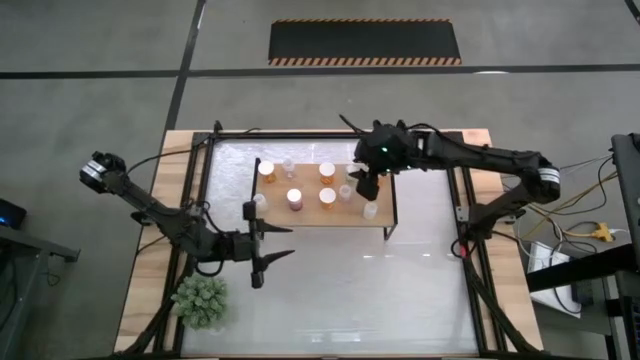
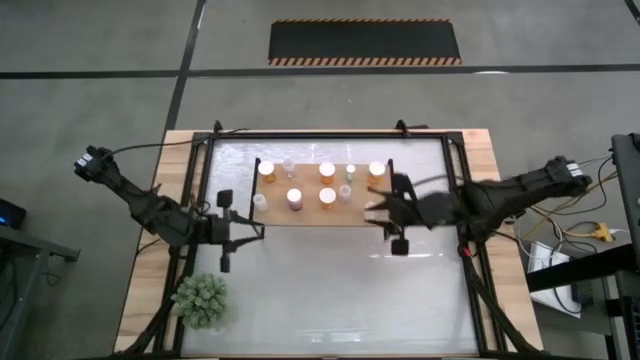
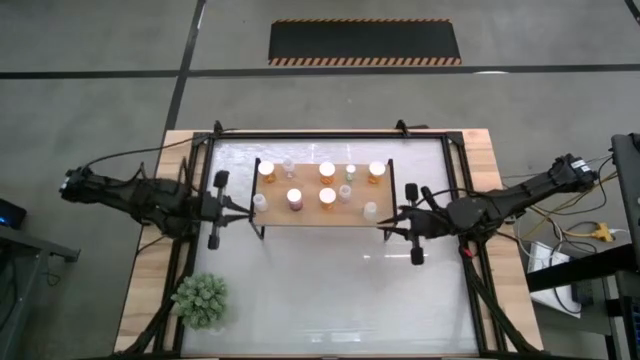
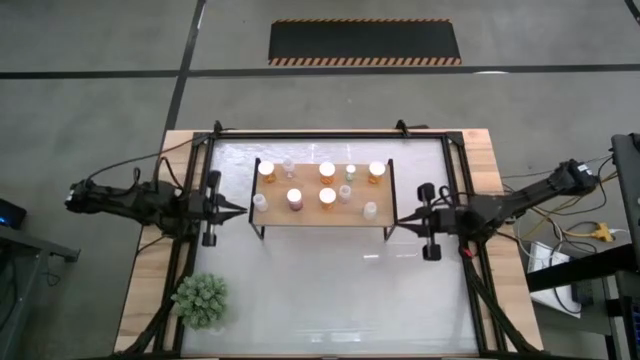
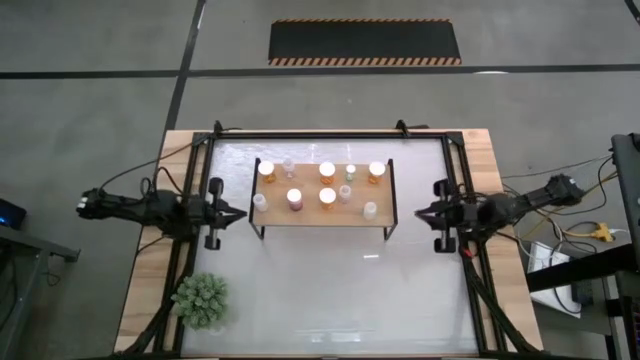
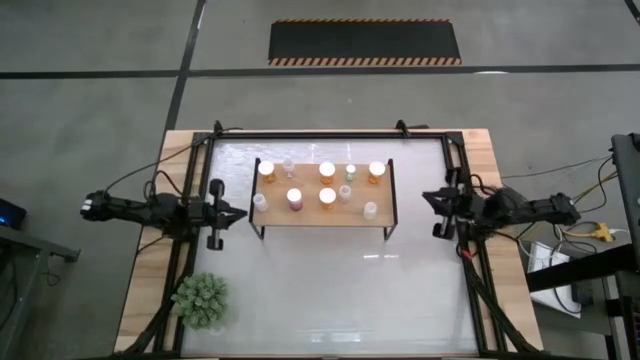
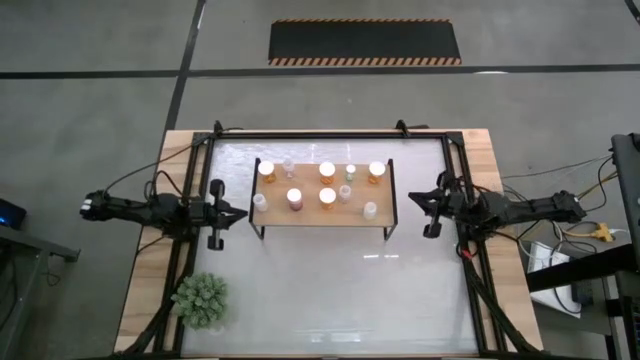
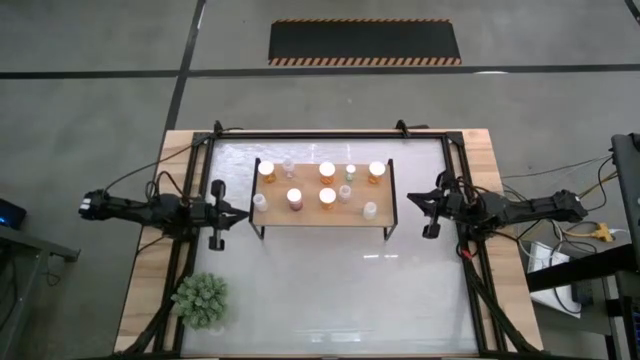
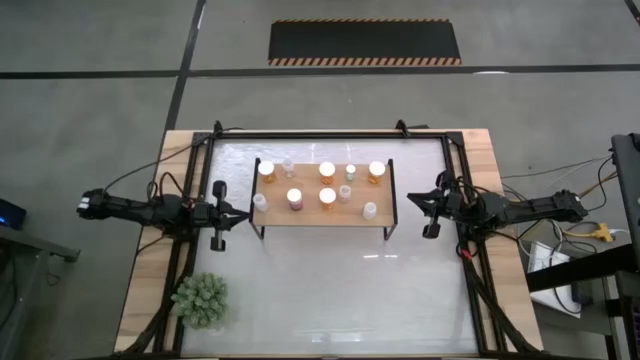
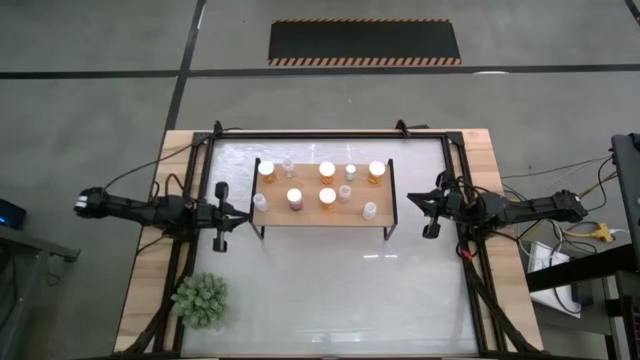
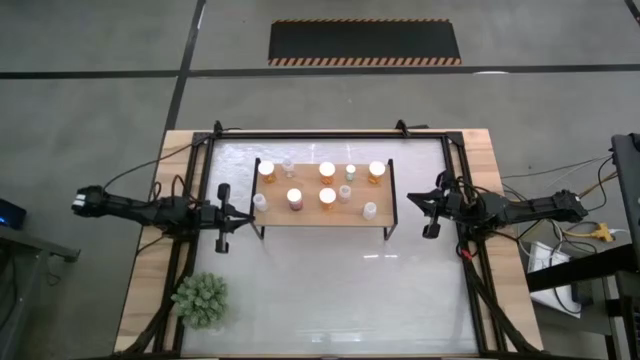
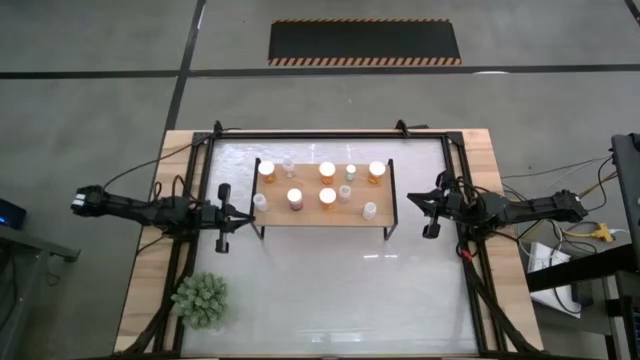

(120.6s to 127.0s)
Task: Pick and place medicine bottles onto shelf by color
Return to Home Position

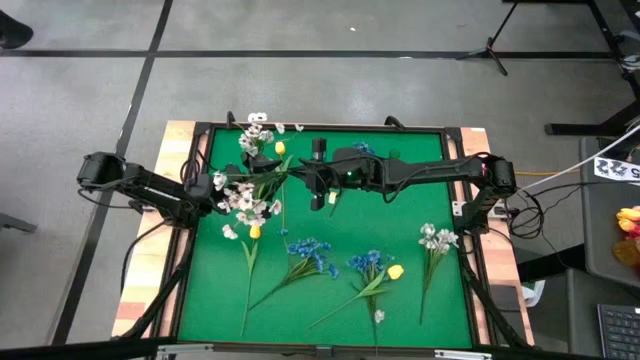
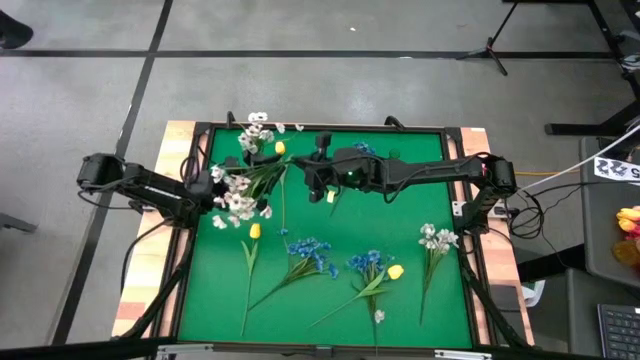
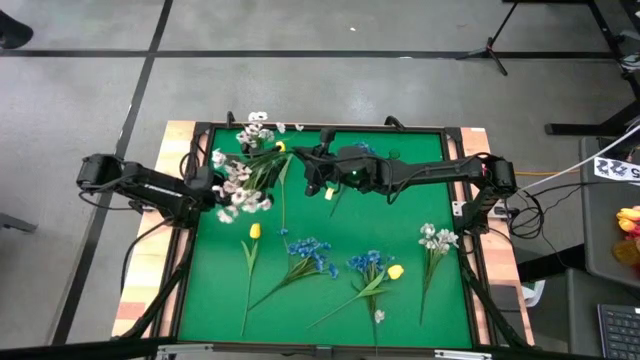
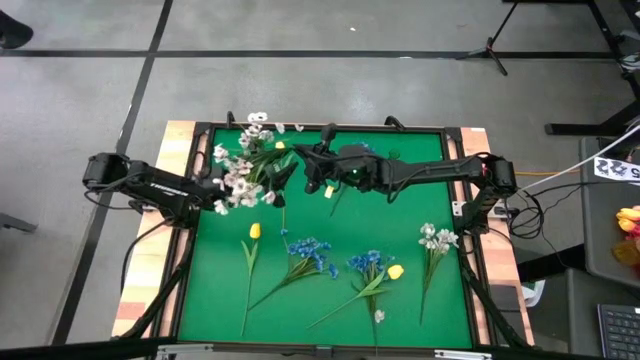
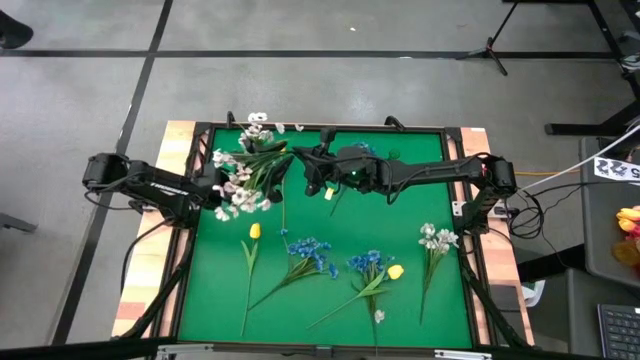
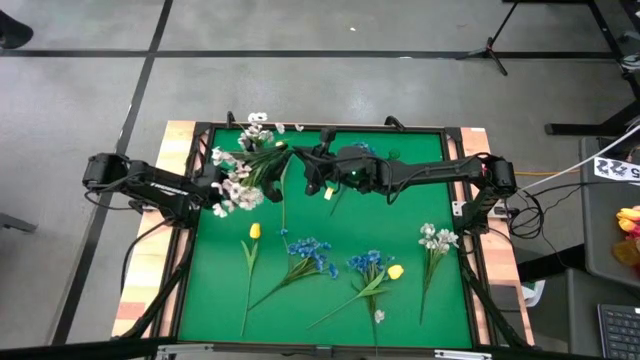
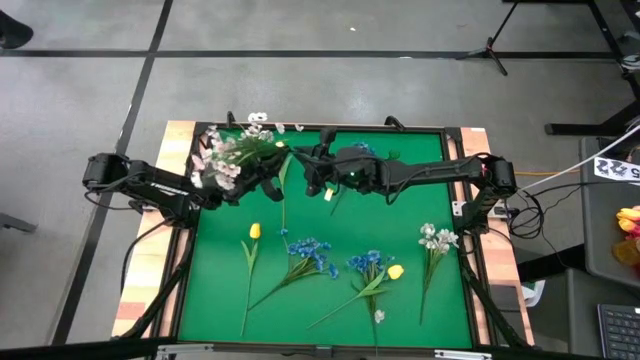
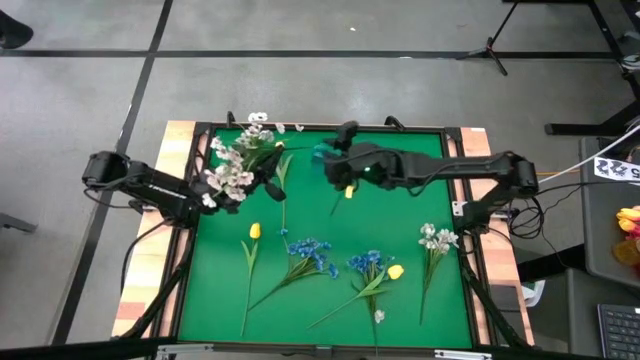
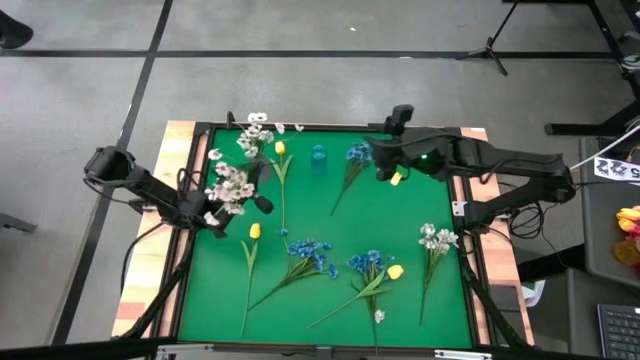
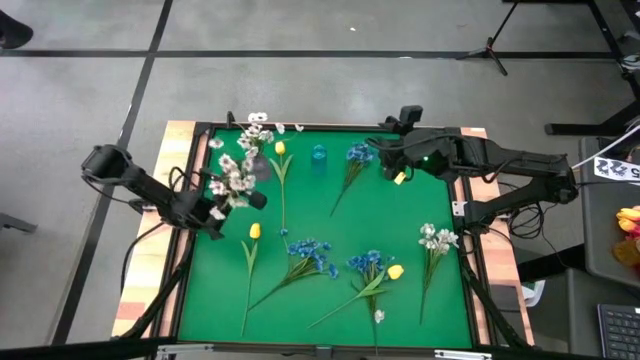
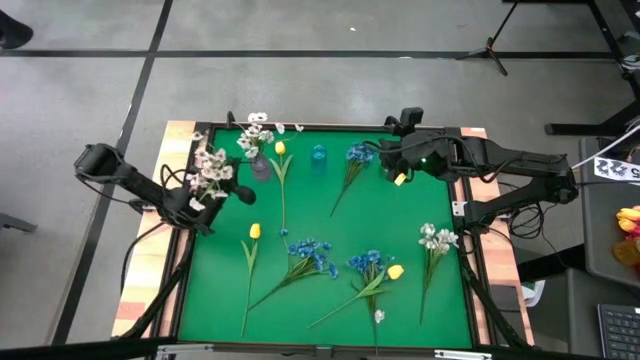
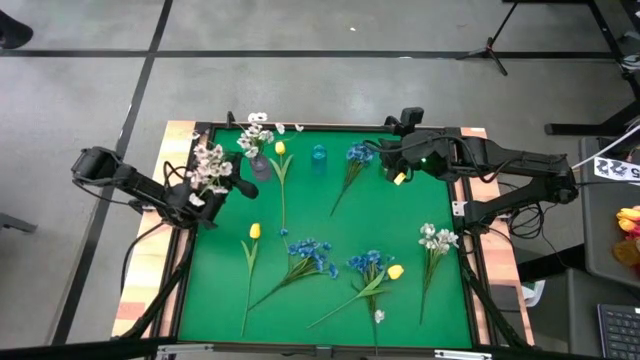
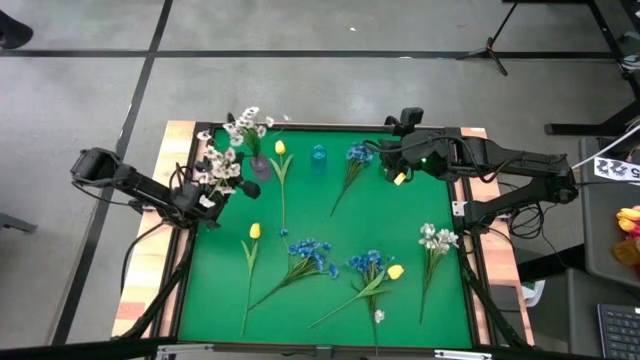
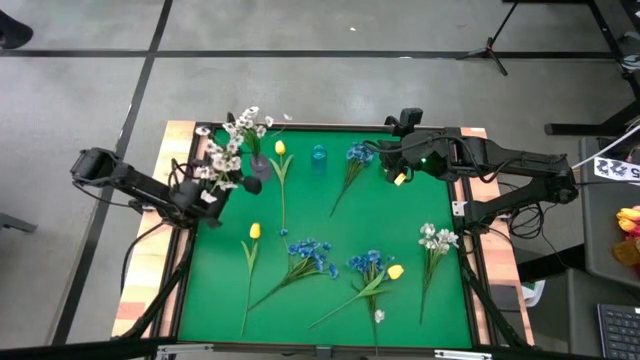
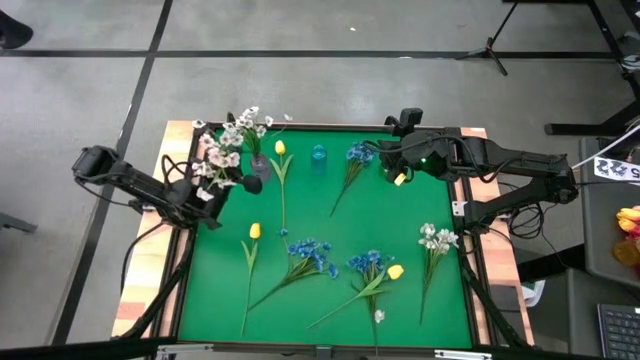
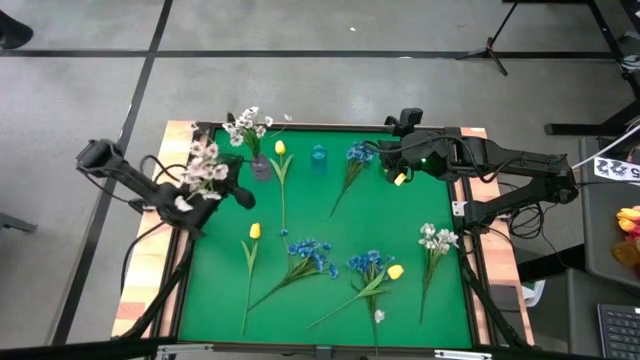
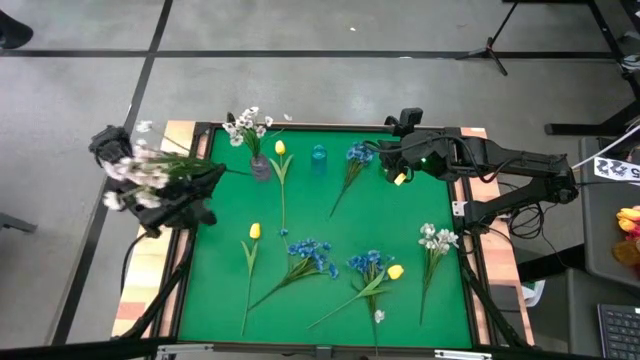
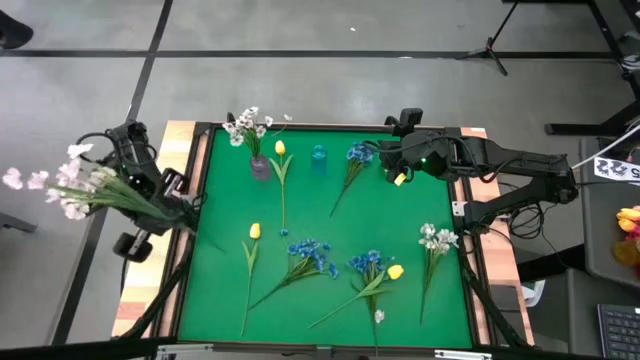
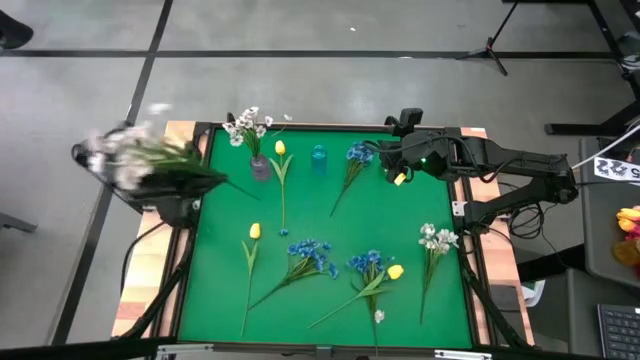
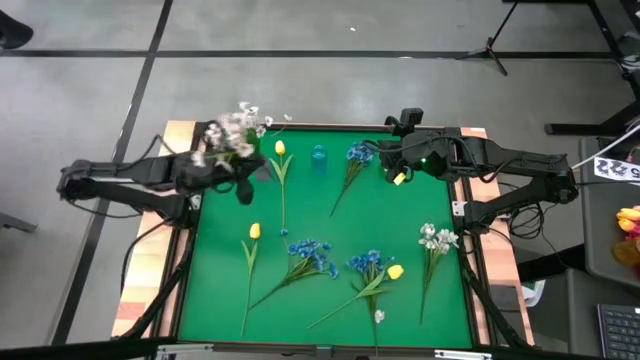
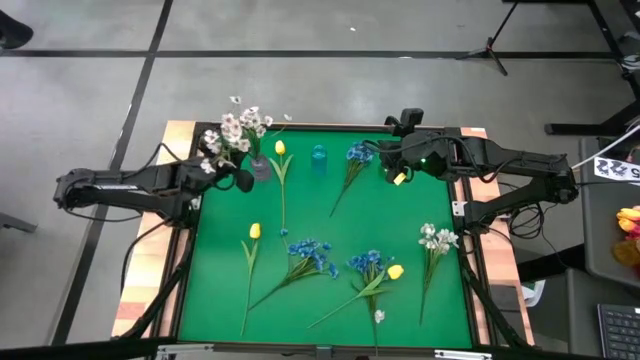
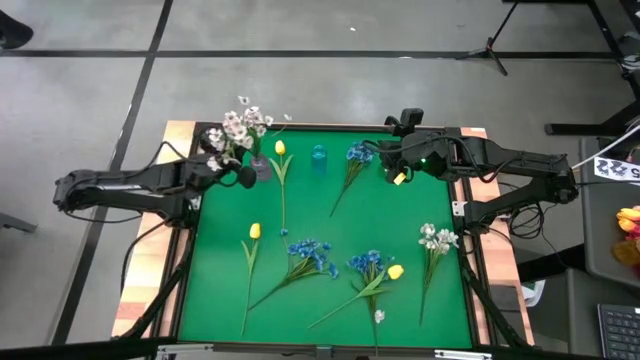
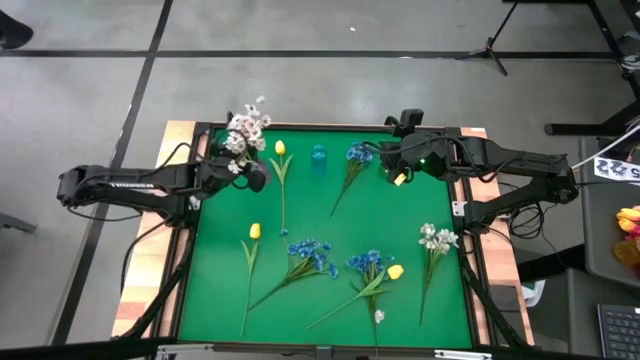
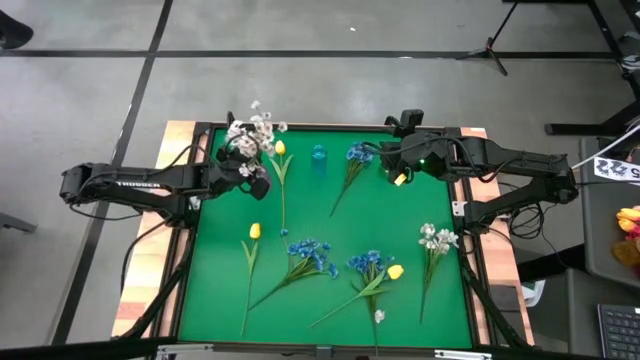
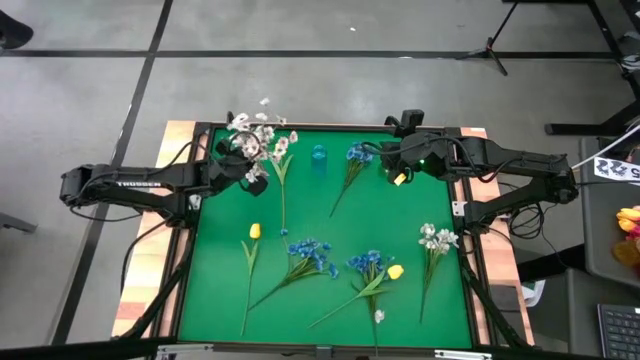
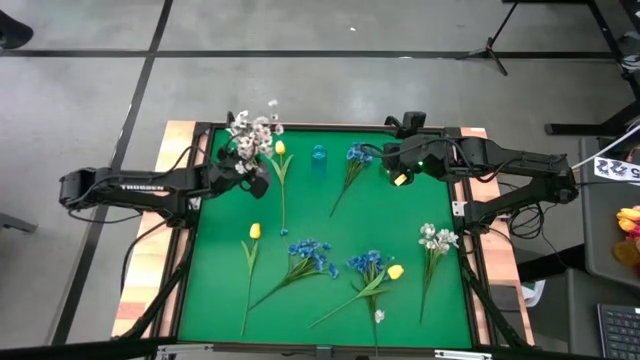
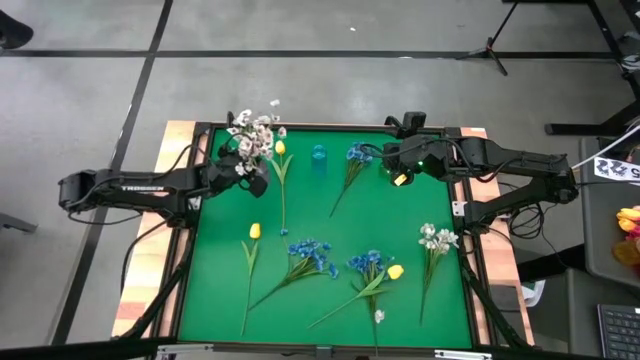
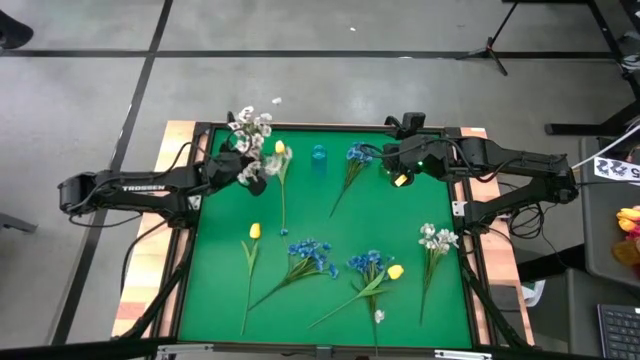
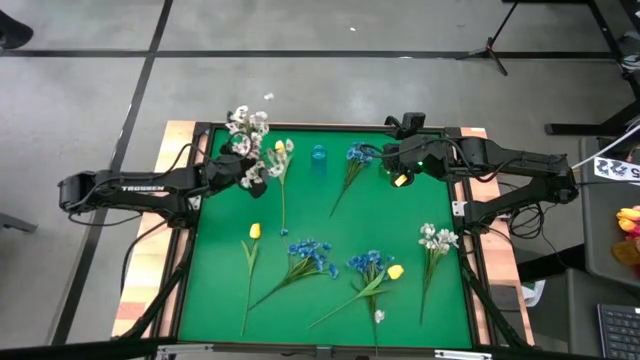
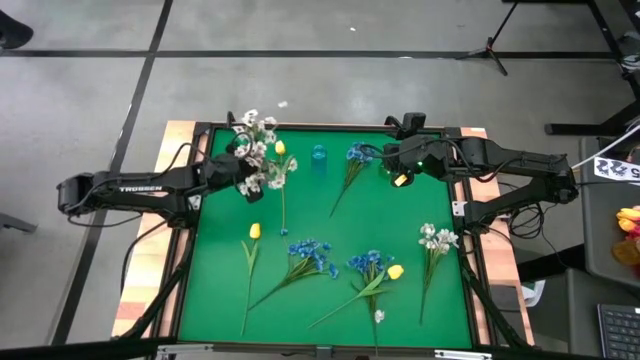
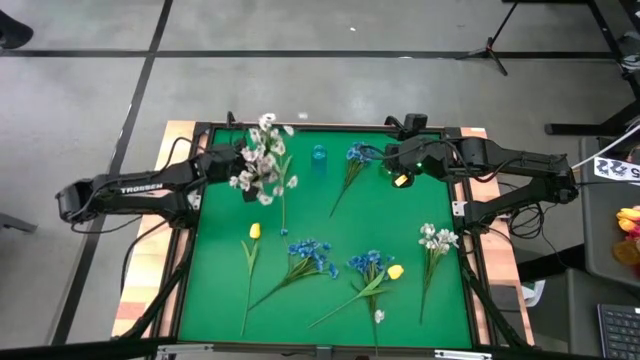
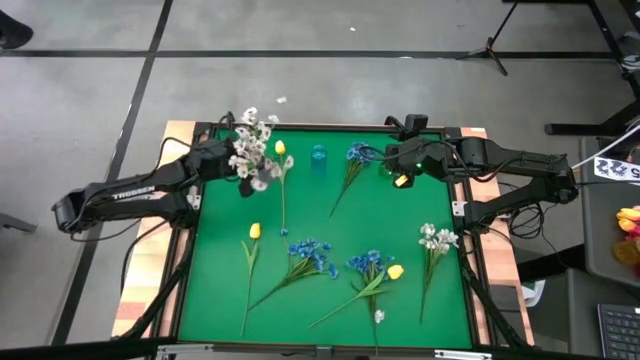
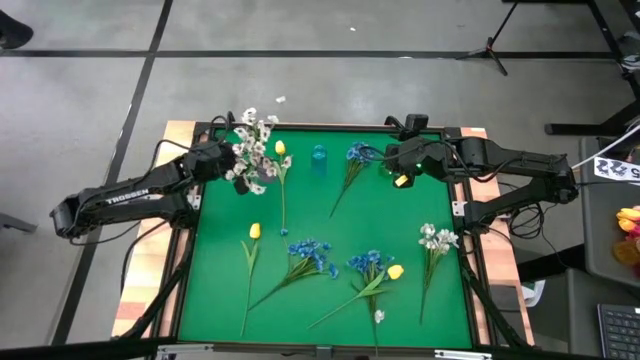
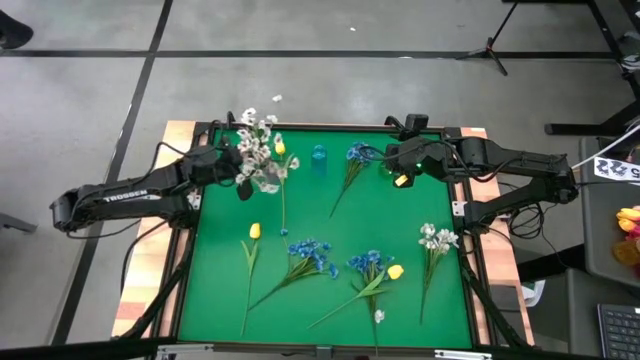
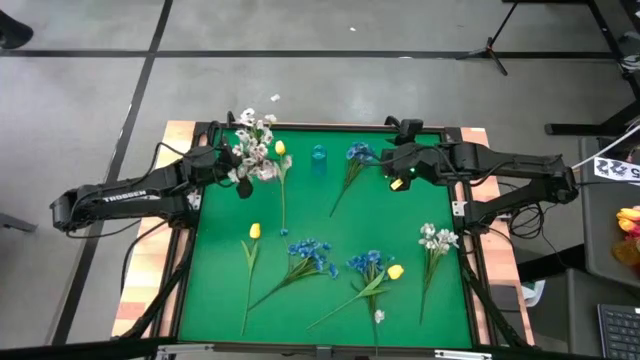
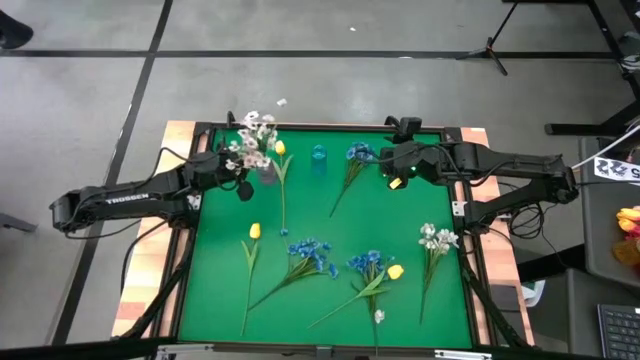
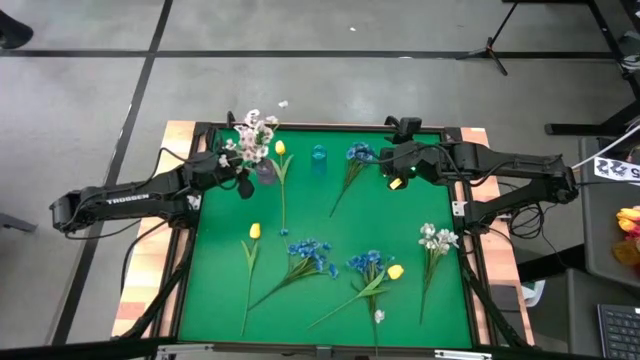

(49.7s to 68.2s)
Task: Sort flowers into vase by color
Put the top white flowers into the violet vase
